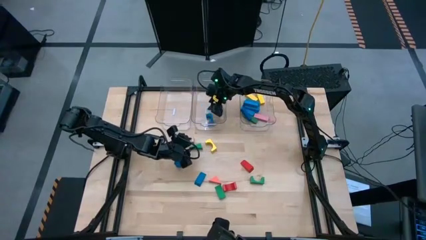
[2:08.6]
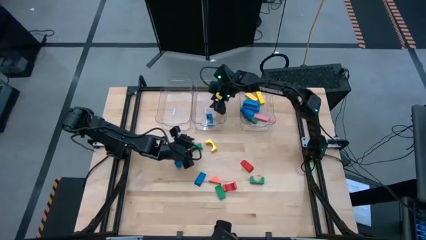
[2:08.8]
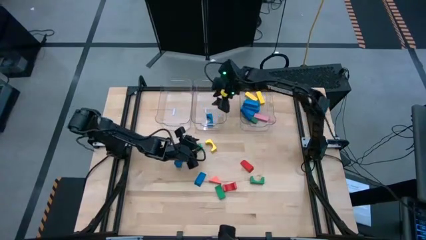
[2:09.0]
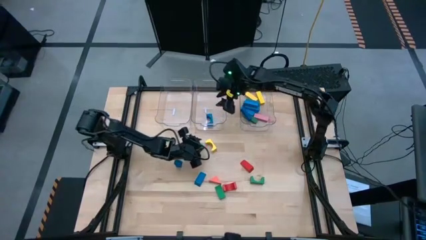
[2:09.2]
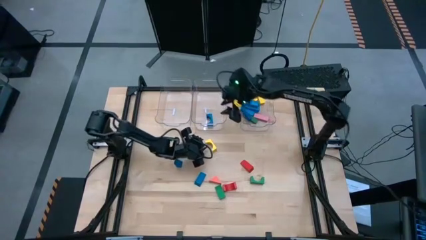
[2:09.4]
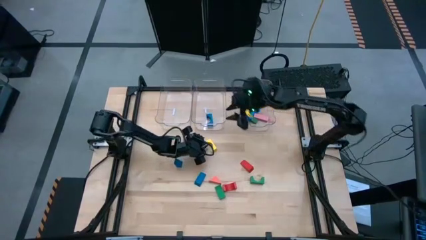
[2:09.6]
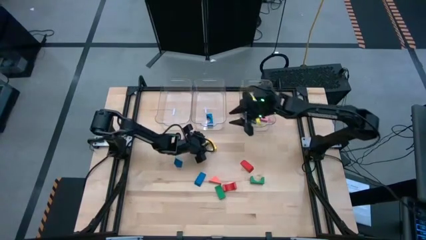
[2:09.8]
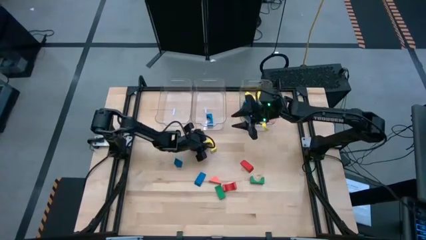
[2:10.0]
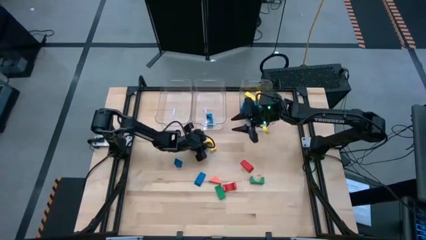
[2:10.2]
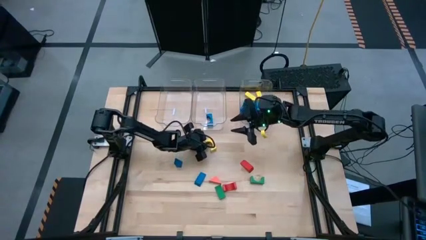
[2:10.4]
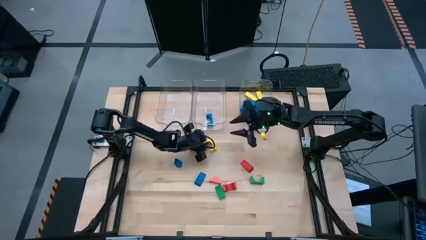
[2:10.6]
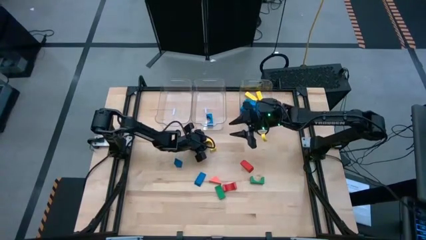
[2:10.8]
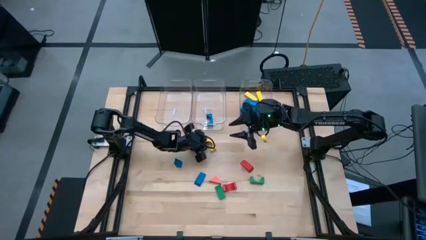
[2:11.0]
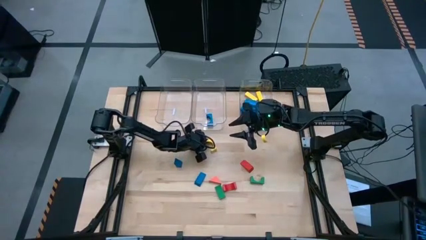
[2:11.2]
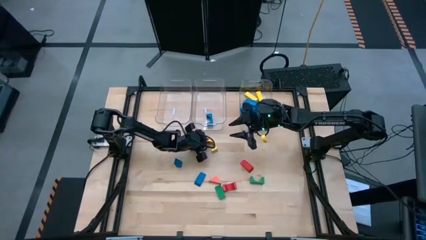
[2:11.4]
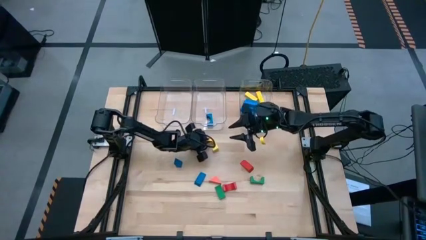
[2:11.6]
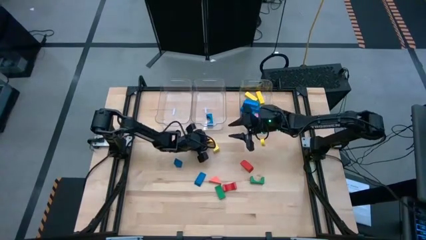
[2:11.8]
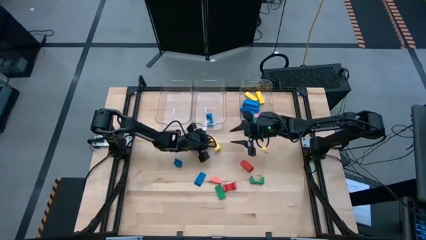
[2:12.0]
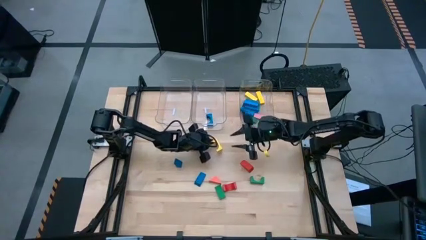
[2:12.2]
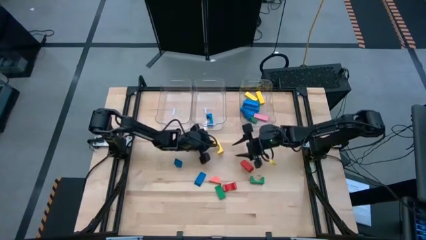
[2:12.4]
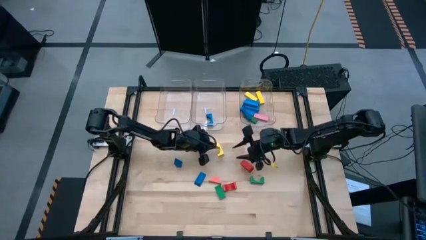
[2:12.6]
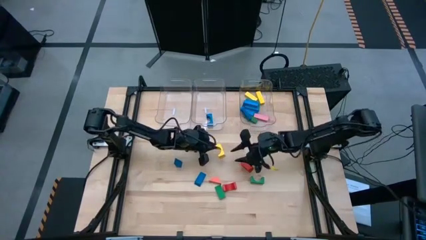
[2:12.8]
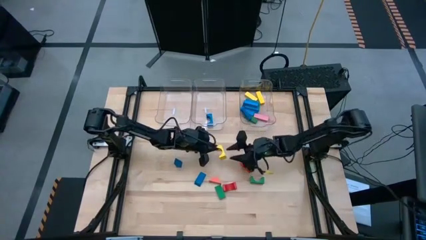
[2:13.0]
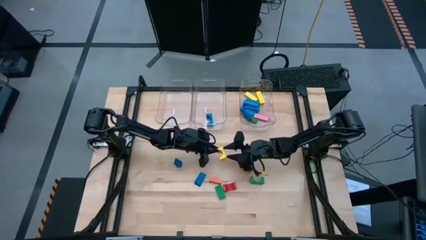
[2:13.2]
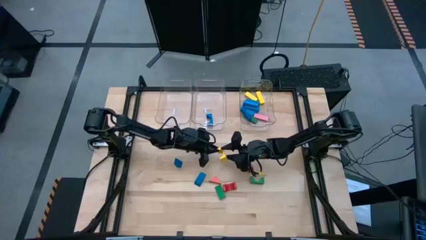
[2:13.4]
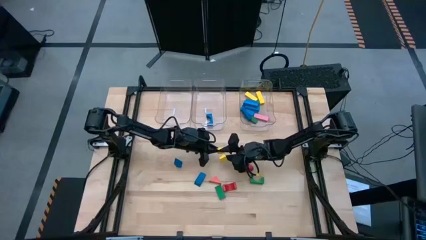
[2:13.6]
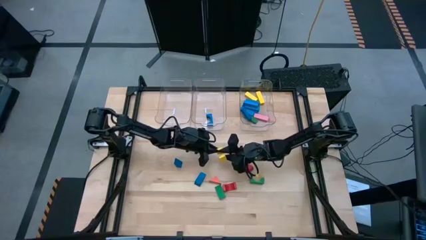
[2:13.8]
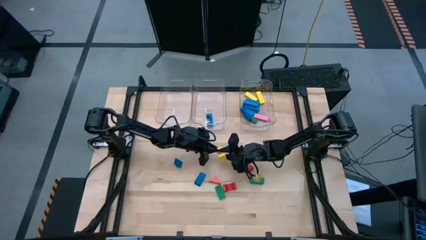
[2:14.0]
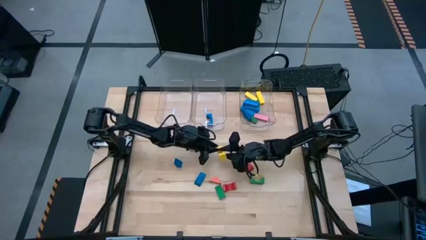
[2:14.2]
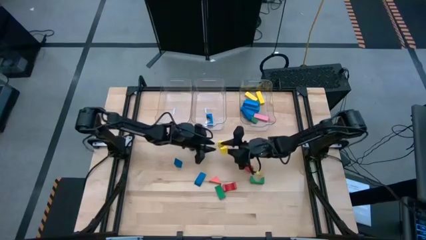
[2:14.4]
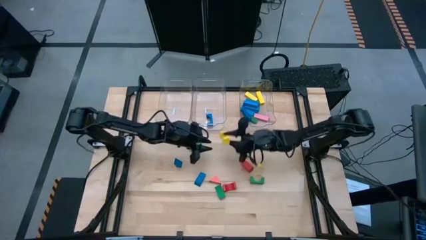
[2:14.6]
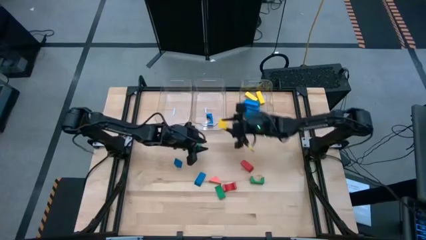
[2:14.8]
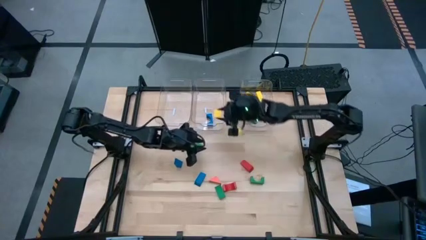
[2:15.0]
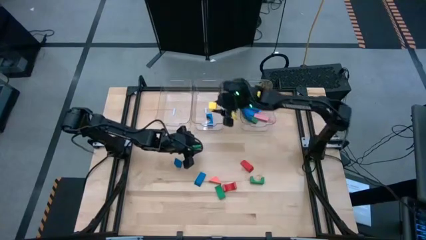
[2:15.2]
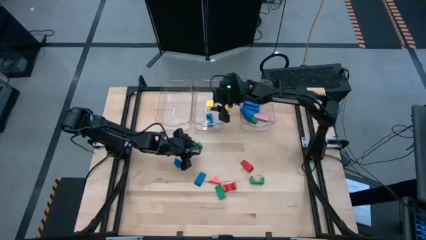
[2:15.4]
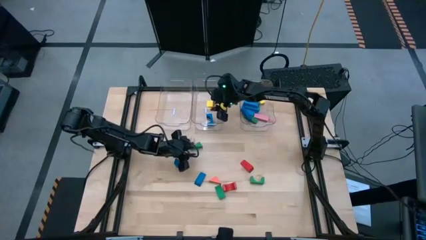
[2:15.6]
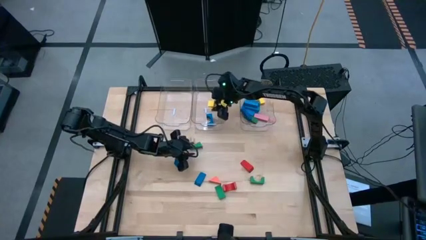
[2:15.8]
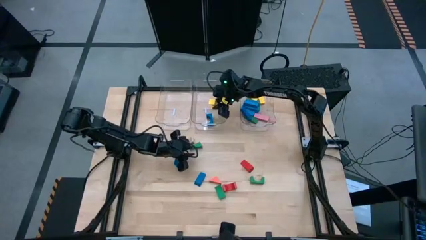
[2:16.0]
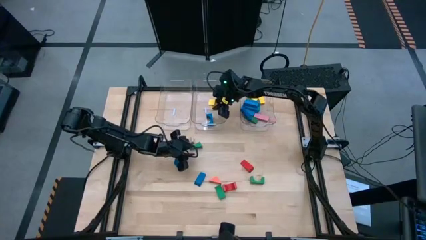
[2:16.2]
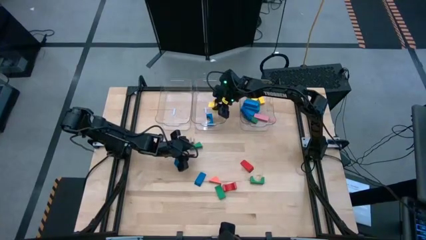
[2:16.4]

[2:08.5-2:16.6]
Task: Sort blocks by size
Put the yellow arch block into the center transparent bin
